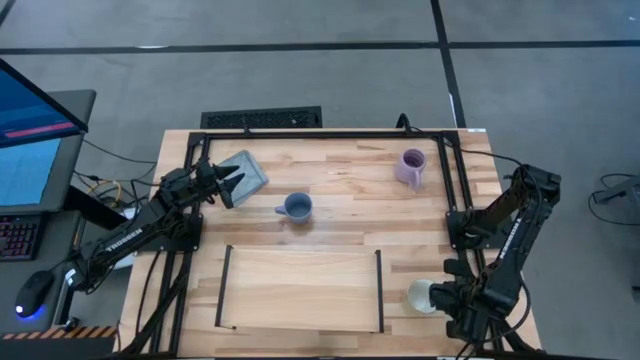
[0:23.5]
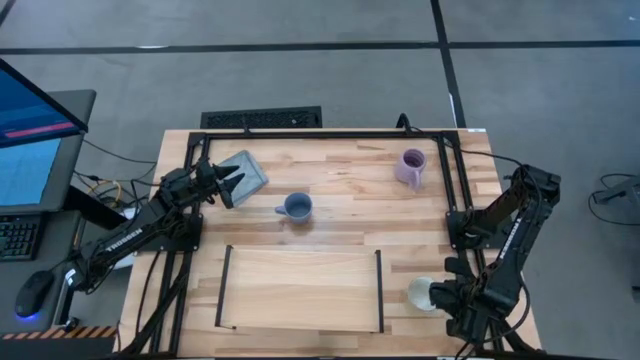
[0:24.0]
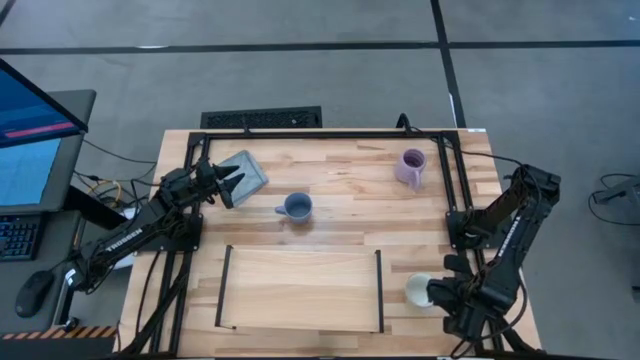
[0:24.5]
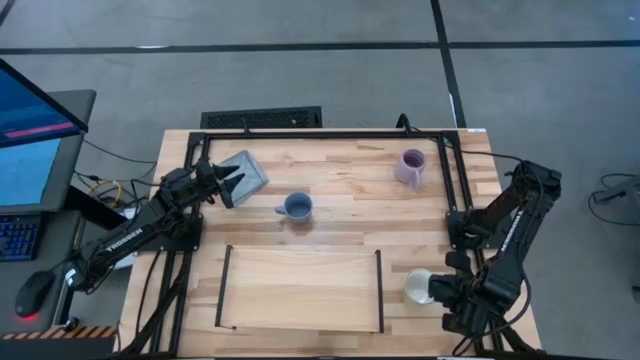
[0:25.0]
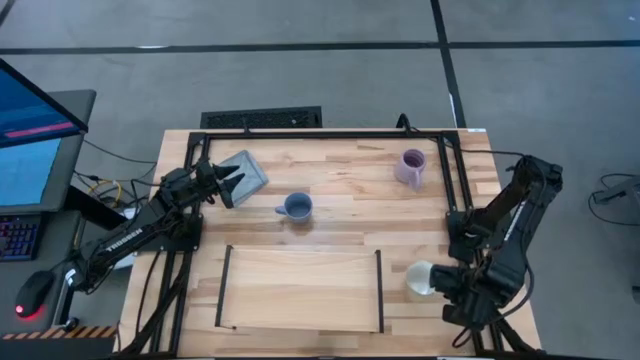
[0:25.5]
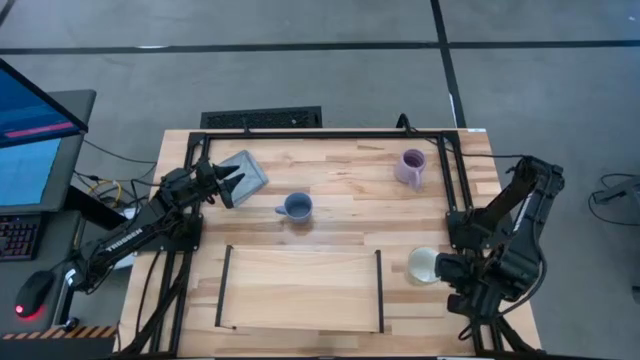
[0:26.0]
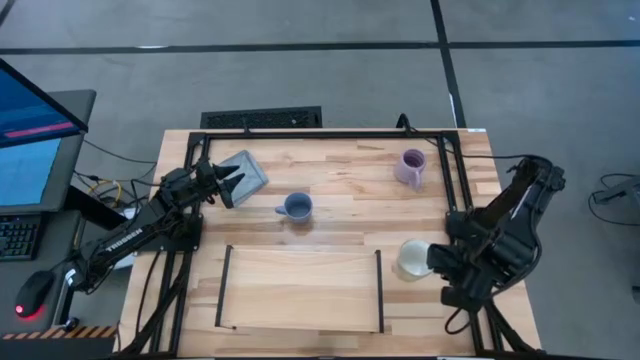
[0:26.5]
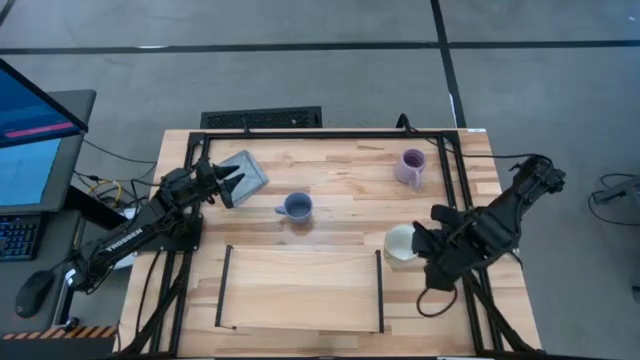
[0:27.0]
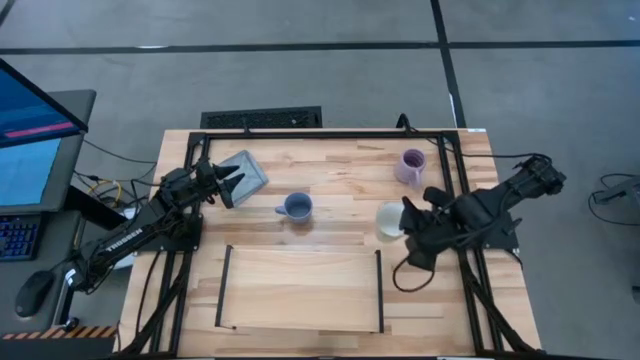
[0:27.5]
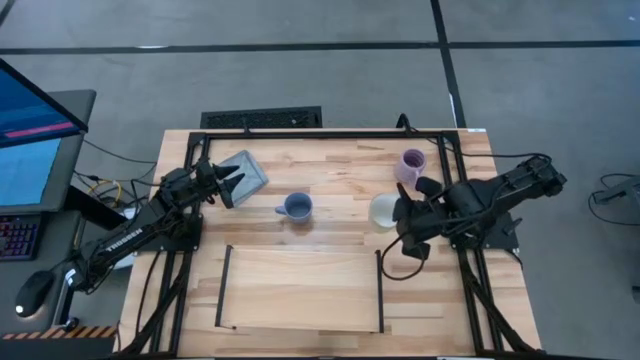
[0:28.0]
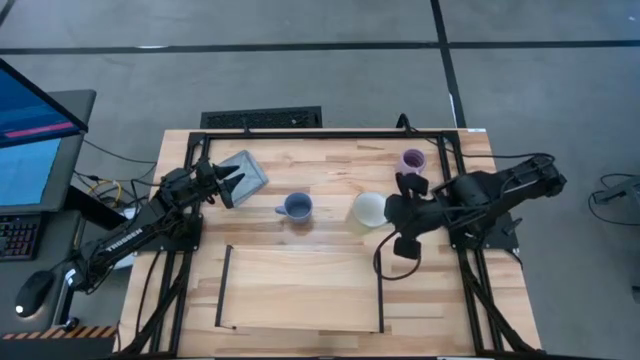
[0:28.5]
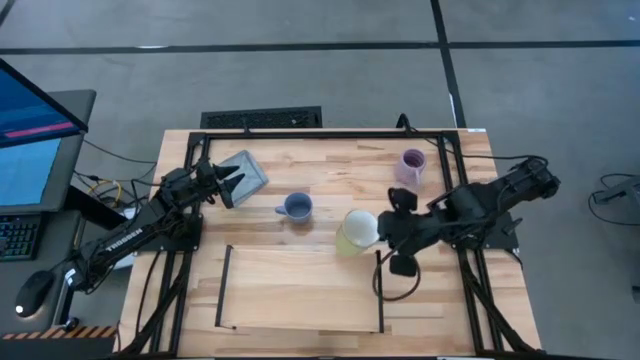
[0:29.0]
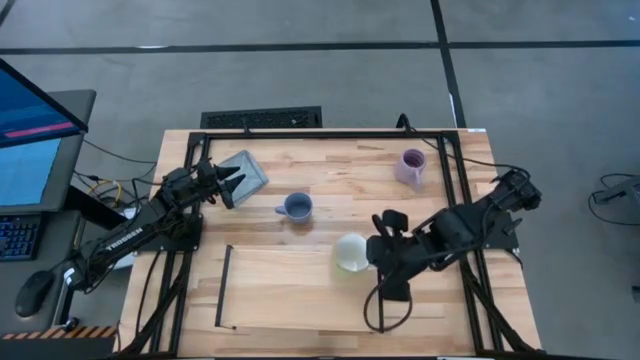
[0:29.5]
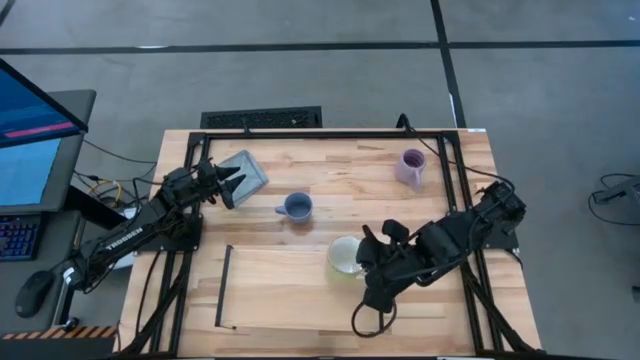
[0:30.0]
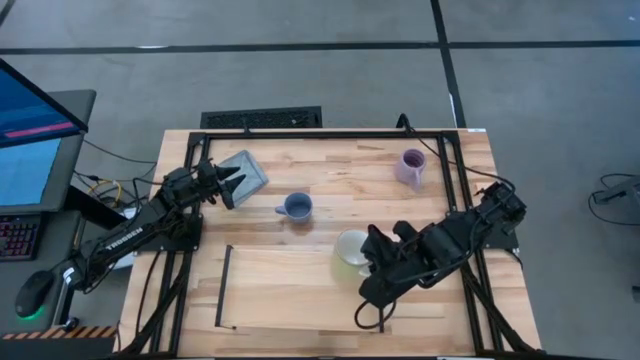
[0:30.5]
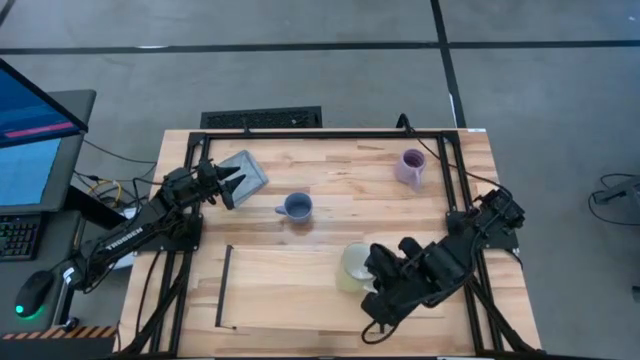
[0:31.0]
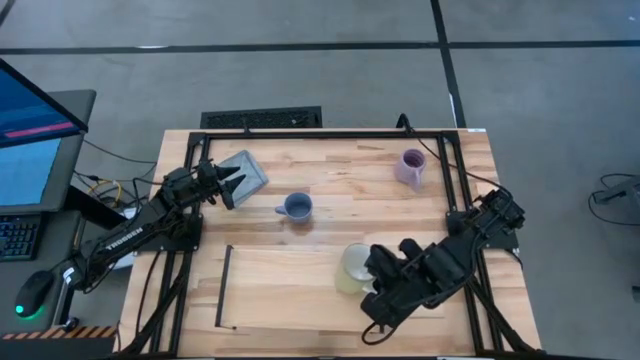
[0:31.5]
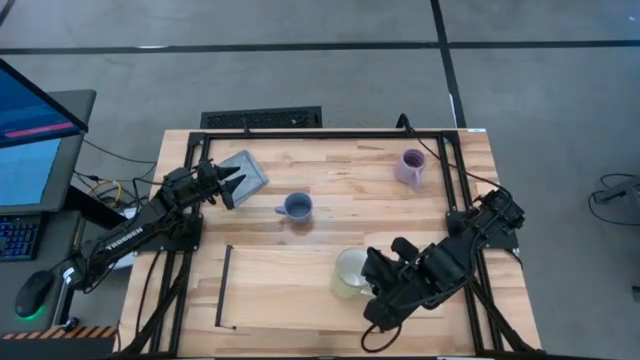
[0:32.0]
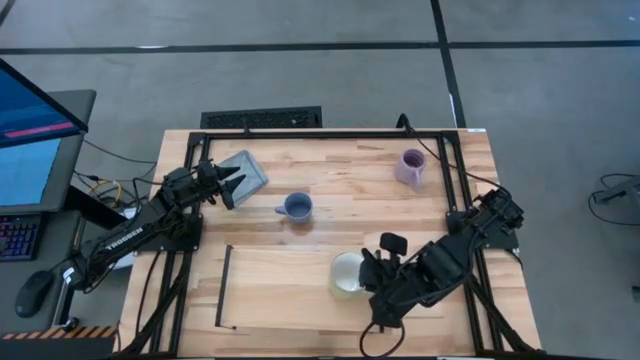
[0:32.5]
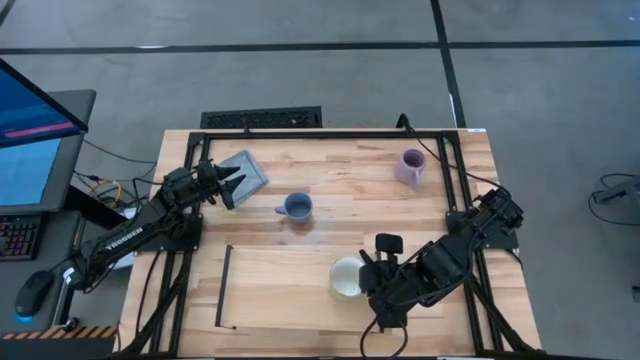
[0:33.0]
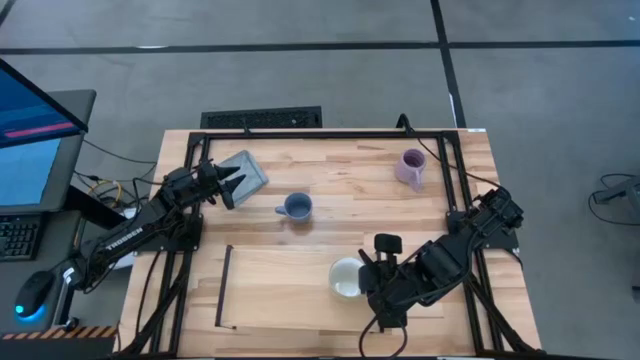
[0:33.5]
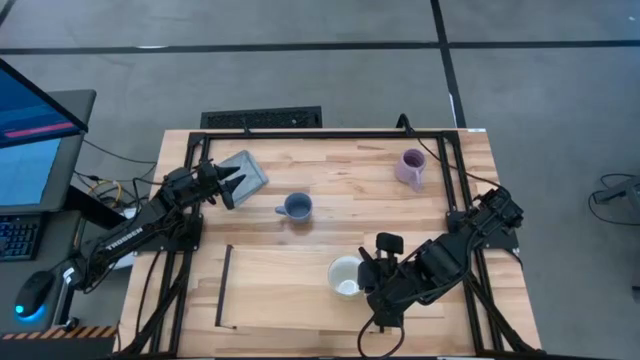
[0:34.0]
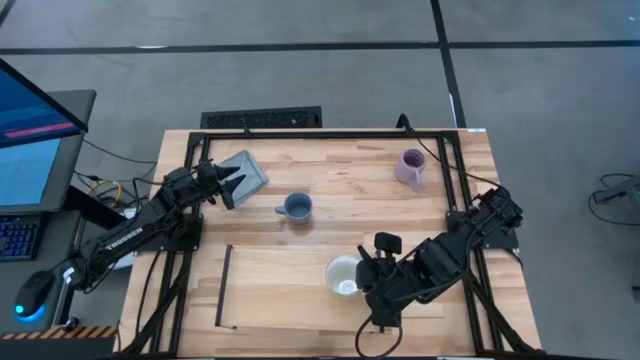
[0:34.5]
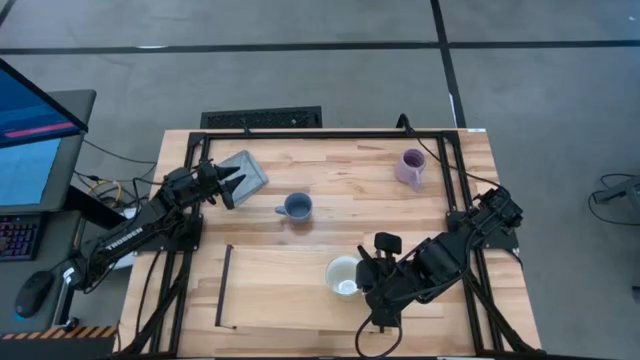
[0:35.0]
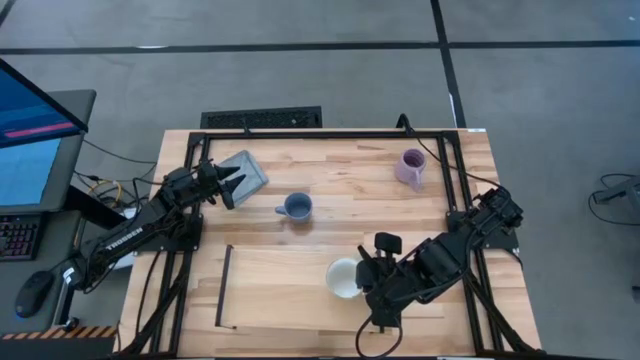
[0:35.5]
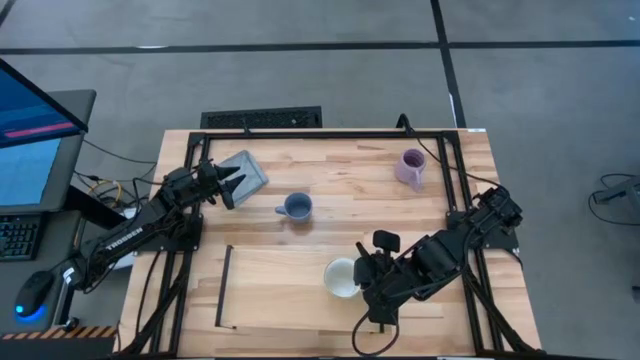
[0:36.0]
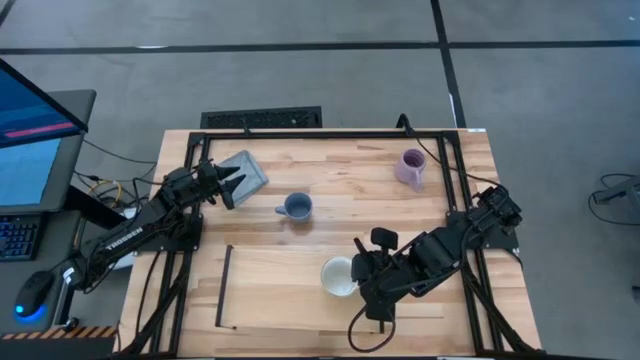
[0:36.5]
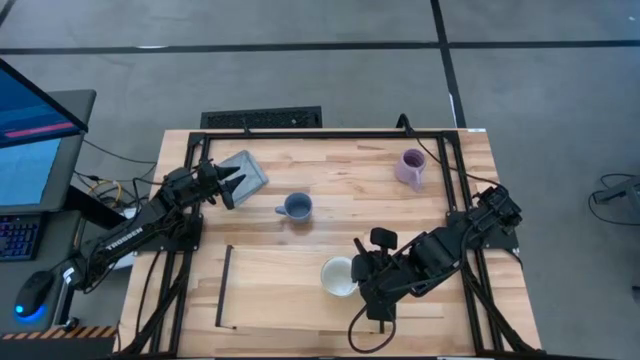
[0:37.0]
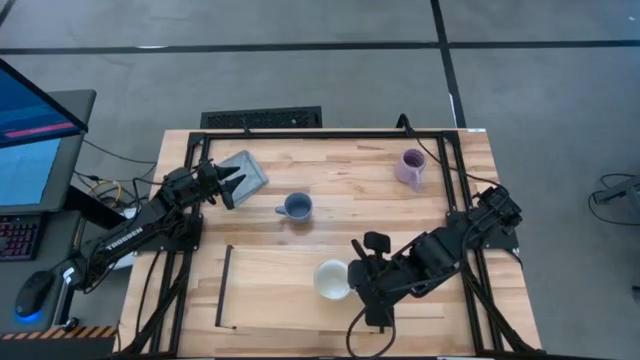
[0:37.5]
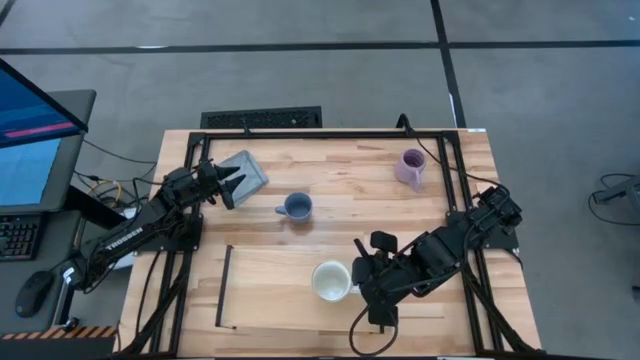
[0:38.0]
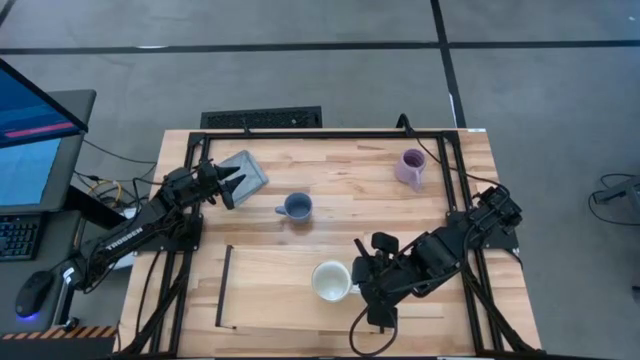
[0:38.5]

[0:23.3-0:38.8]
Task: Stack small to large cups/mugs on shelf
Put the green mug on the shelf

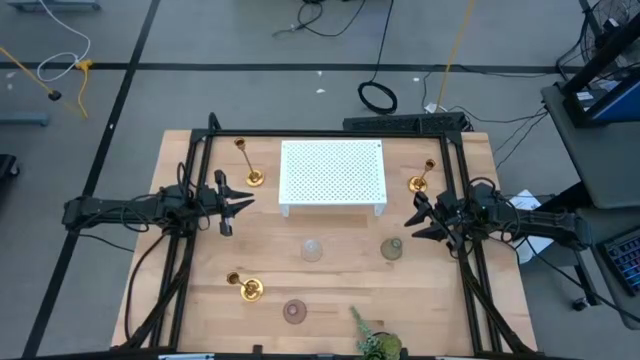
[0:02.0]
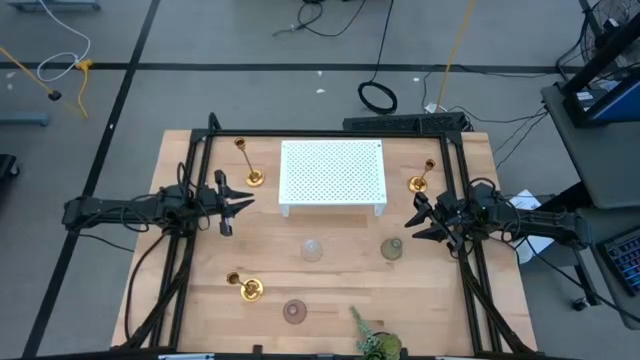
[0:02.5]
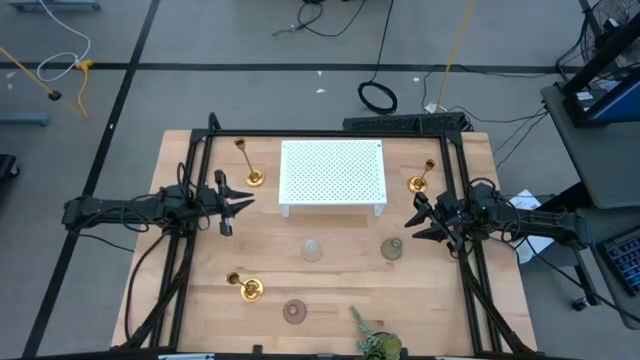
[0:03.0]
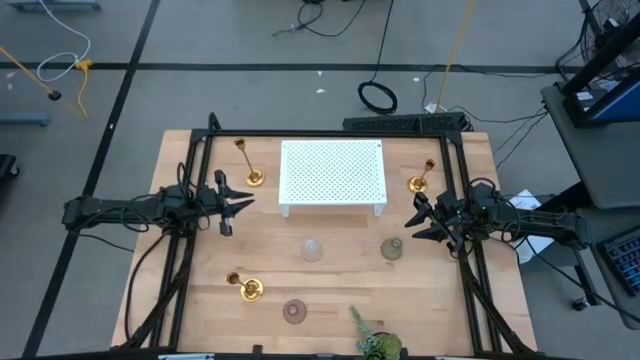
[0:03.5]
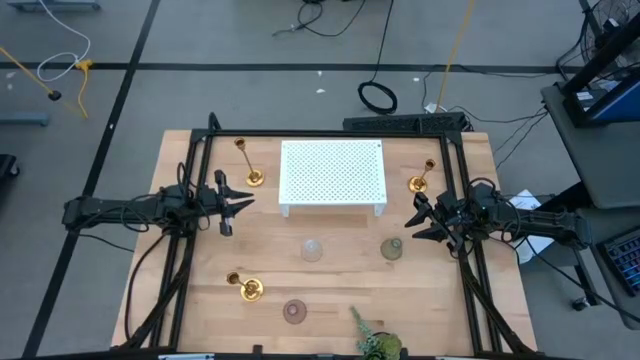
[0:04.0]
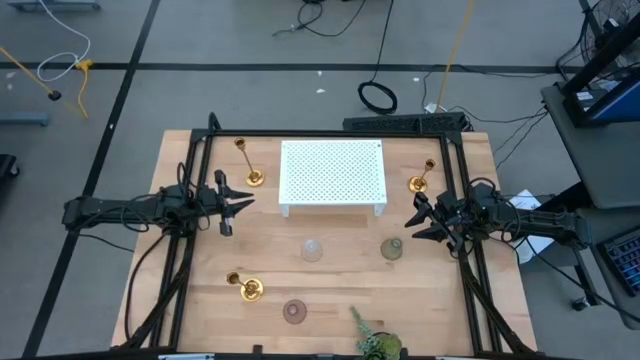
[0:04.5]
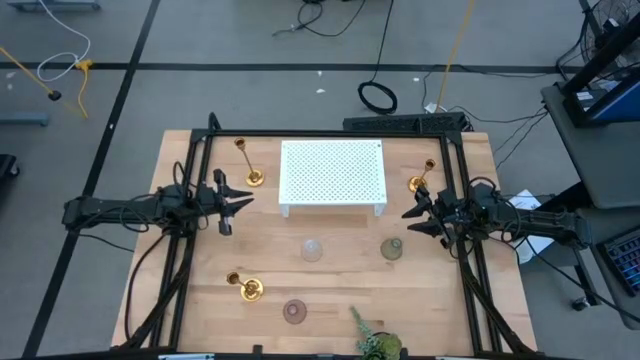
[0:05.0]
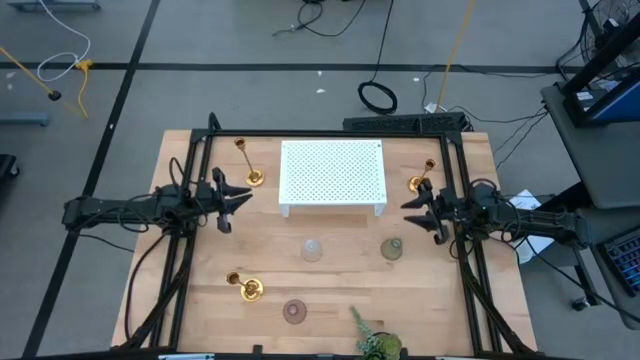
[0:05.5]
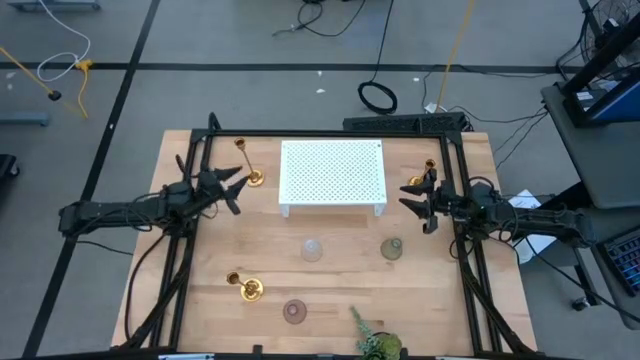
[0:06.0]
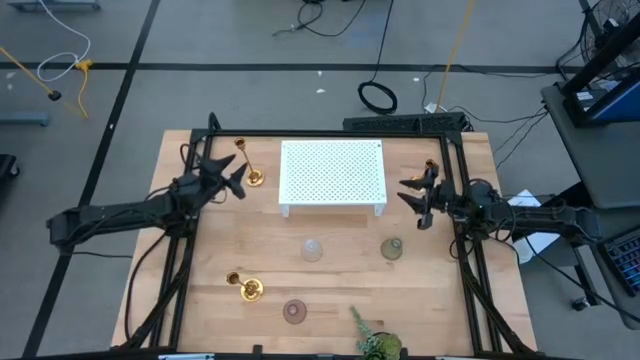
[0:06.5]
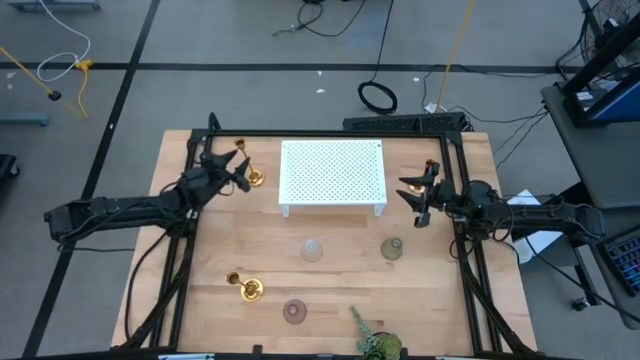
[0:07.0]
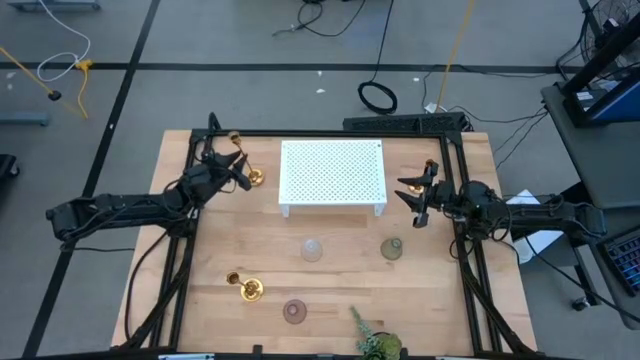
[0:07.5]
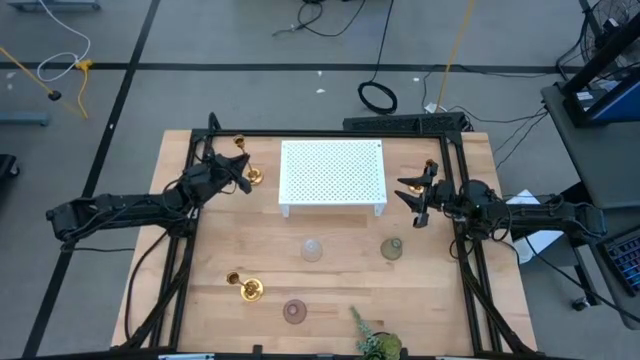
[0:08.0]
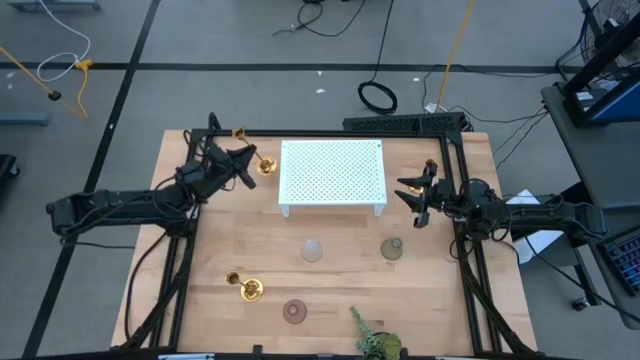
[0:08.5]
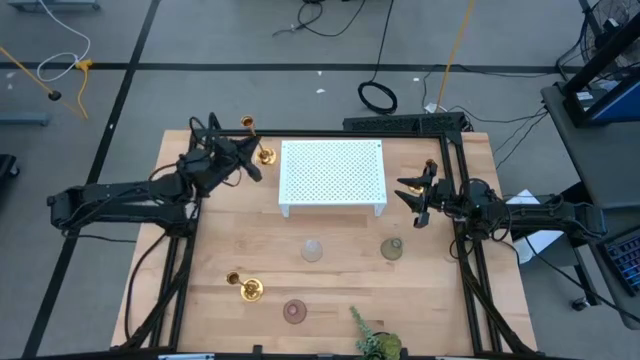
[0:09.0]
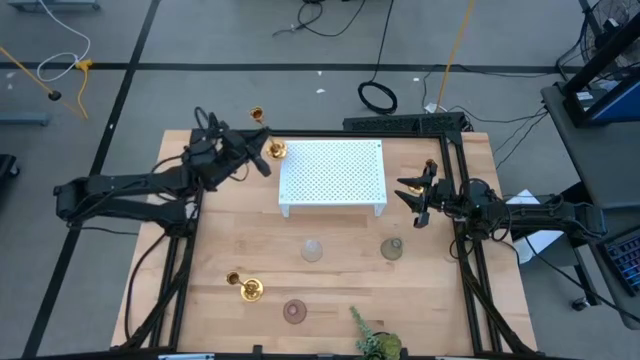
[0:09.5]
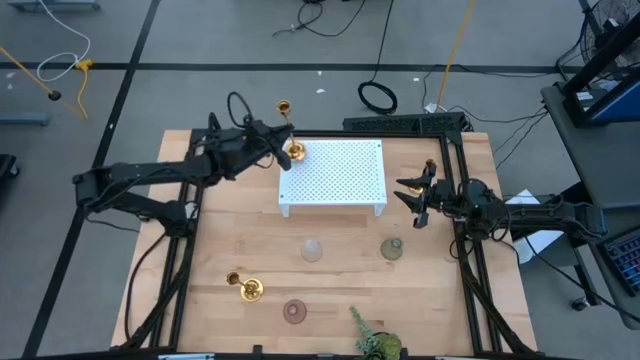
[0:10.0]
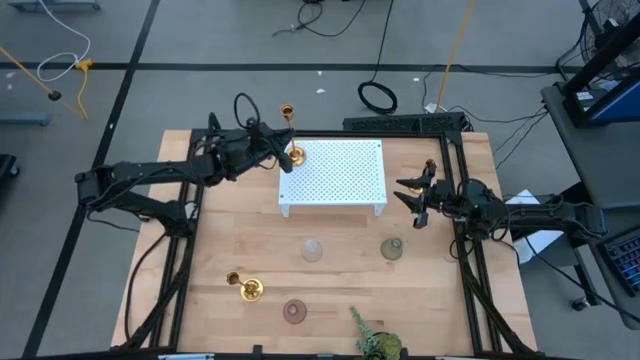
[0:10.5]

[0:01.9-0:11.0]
Task: Pick & Place candle stick holders
Put the top left gold candle holder on the shelf
